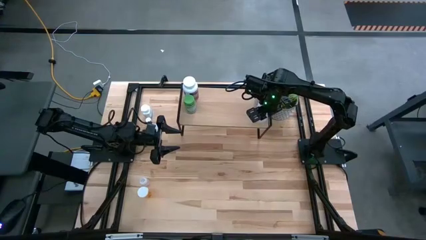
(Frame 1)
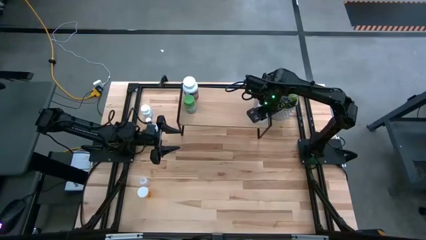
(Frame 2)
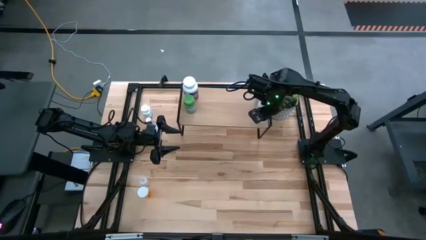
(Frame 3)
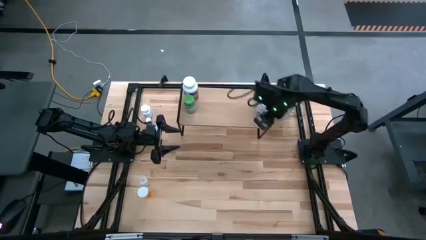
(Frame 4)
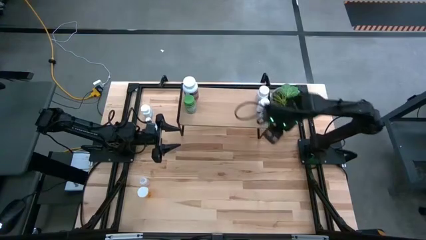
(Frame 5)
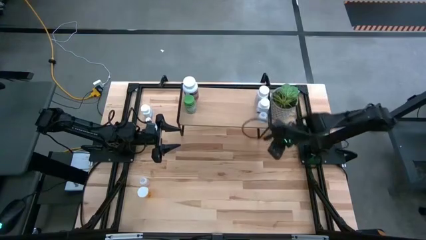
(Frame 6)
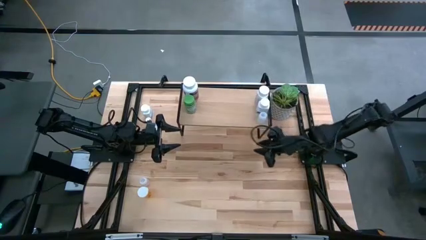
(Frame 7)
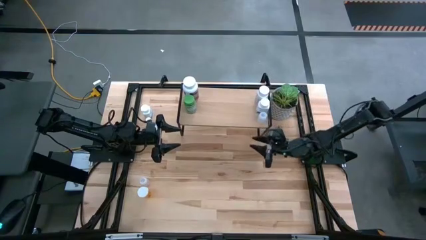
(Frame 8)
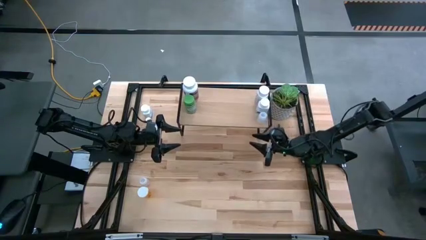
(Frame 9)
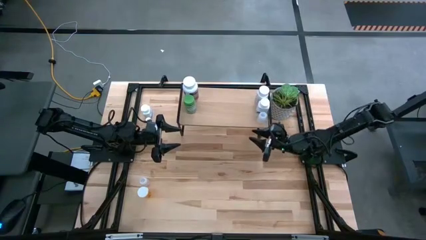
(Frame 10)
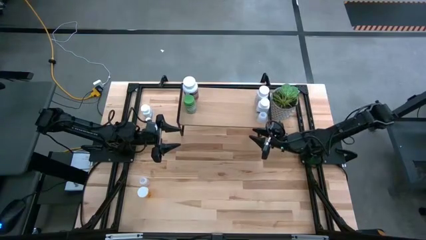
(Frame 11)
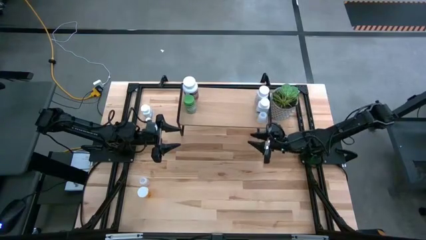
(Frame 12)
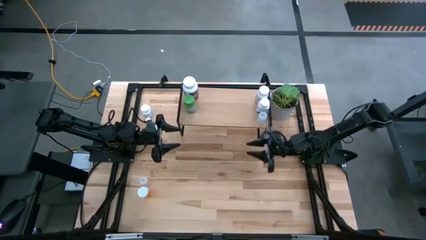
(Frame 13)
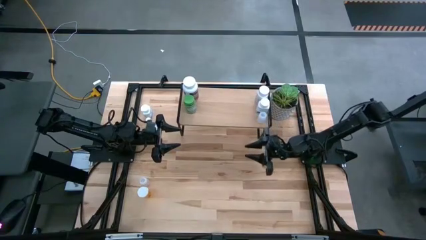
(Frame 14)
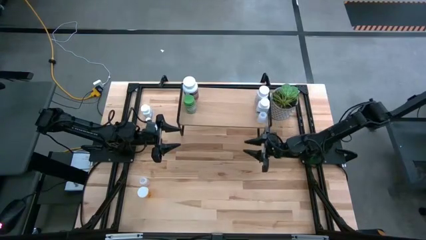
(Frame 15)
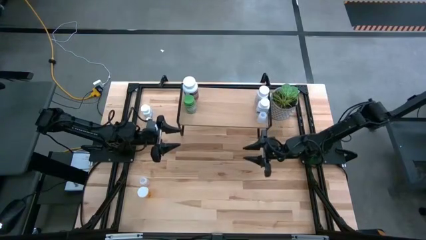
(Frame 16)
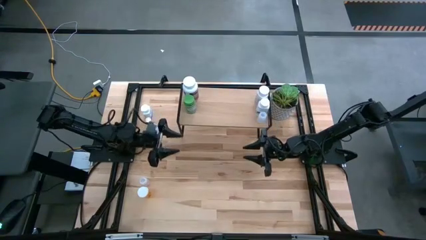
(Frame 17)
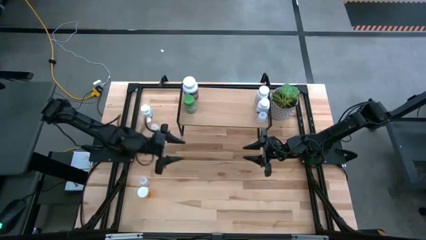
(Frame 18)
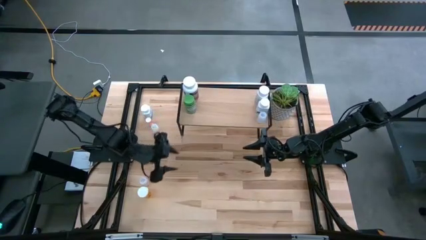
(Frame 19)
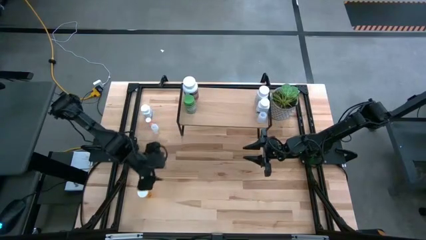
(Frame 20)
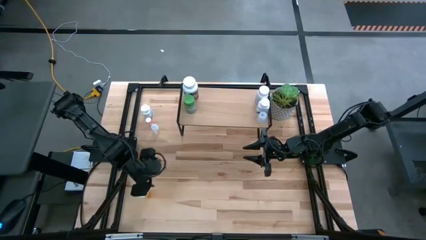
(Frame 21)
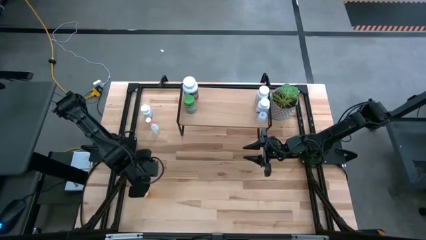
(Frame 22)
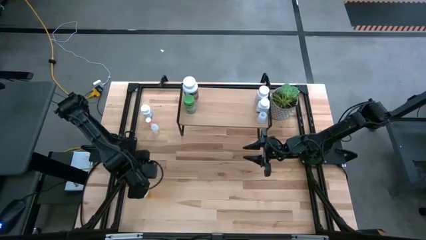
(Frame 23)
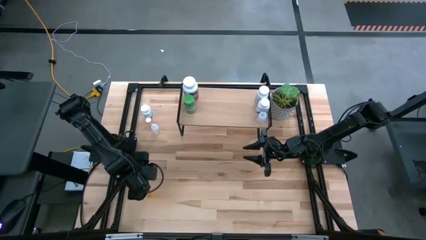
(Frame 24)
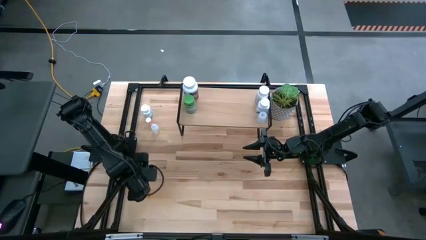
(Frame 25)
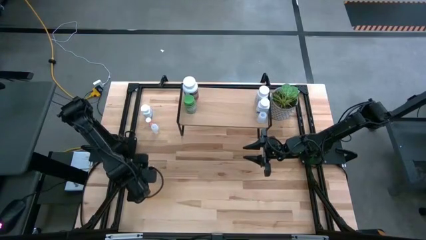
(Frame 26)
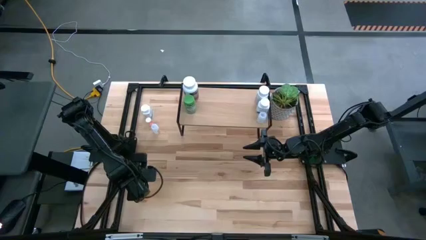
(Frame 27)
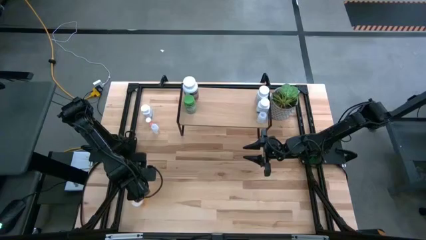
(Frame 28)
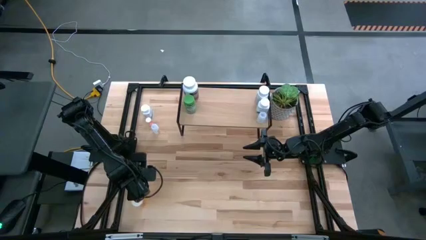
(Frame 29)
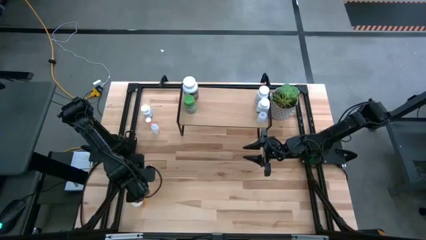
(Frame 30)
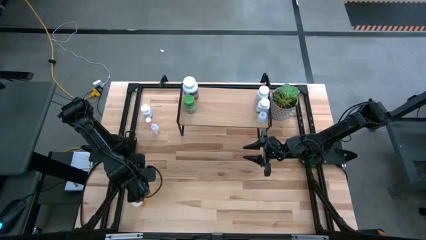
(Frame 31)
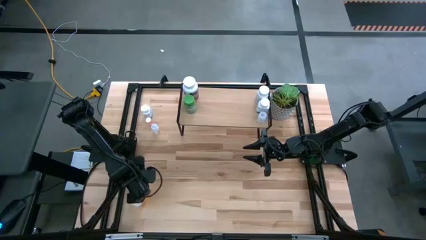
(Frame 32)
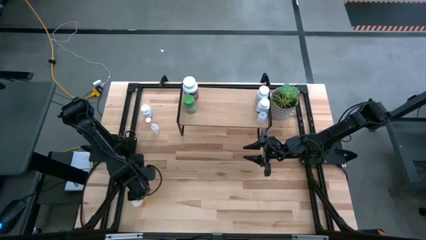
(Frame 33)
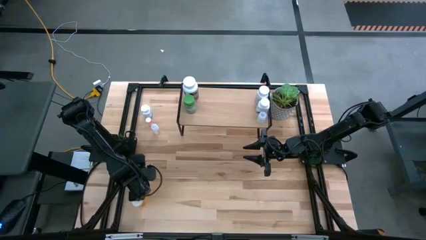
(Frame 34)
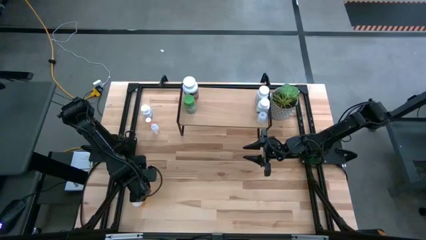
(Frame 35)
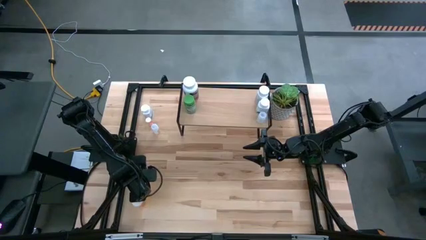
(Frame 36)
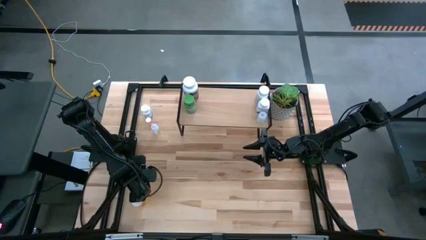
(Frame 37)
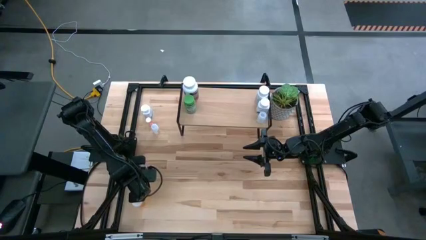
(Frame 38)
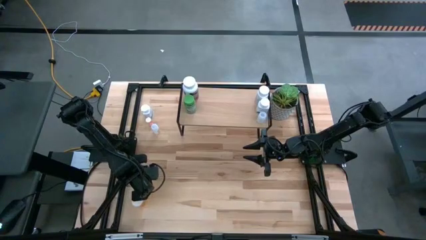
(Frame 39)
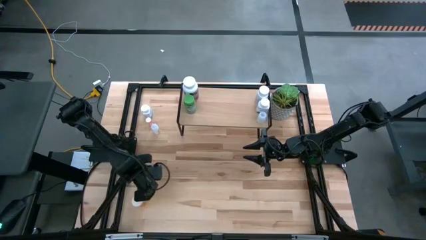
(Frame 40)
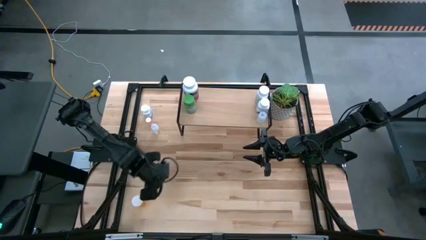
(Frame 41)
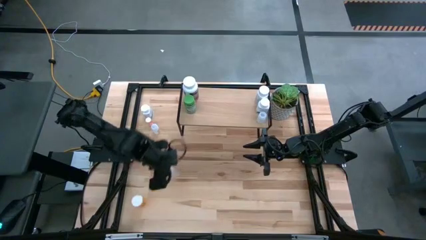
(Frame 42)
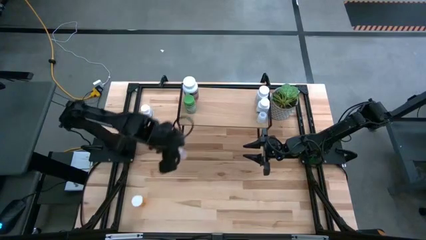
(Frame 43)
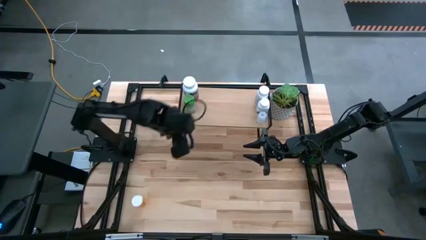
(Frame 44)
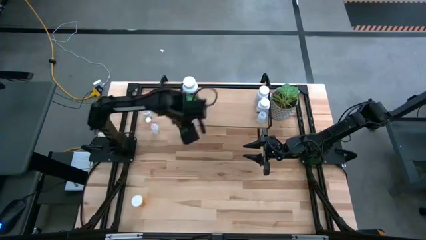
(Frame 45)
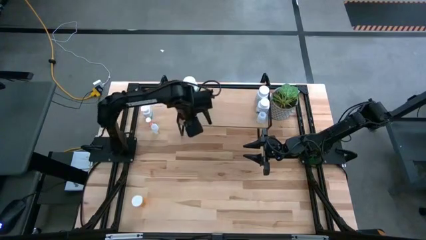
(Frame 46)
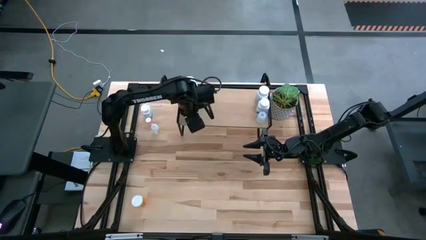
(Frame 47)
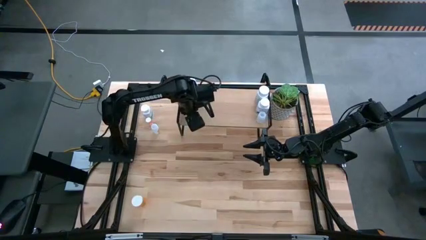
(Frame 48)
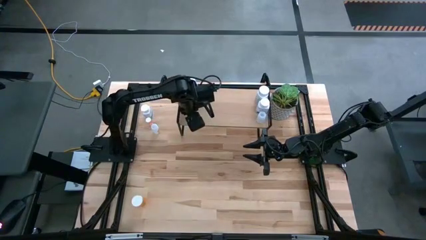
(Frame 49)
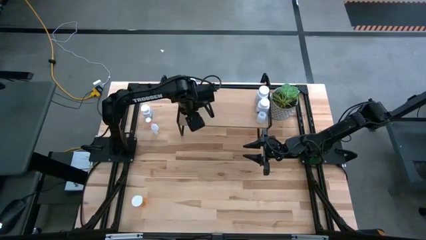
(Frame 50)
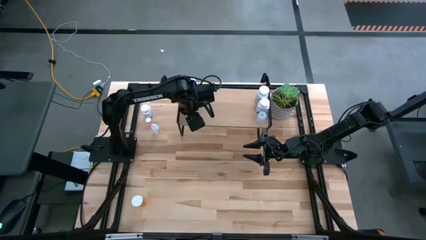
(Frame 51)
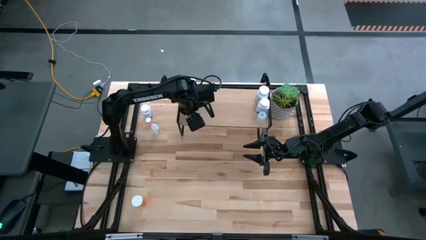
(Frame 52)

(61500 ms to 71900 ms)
Task: Pick and place medicine bottles onto shelf by color
Put the transparent pill bottle on the shelf

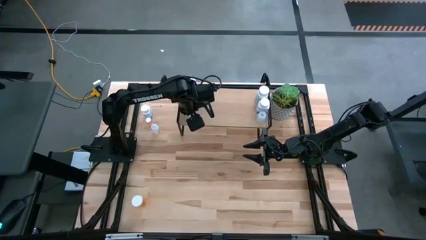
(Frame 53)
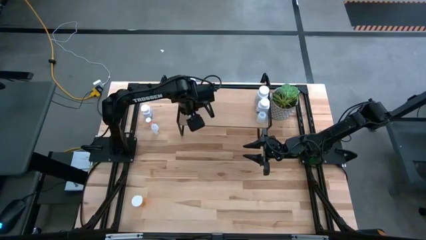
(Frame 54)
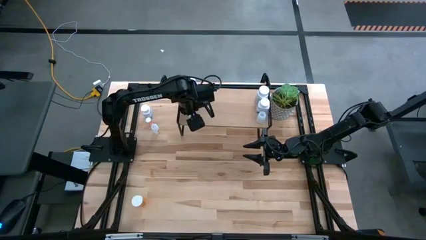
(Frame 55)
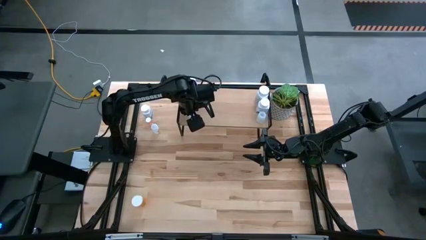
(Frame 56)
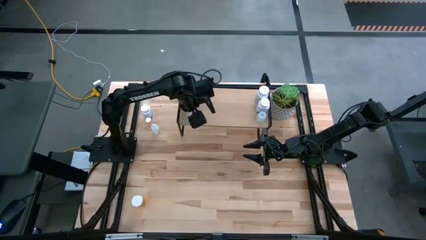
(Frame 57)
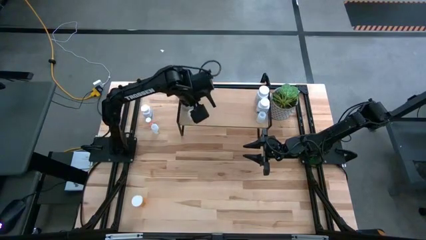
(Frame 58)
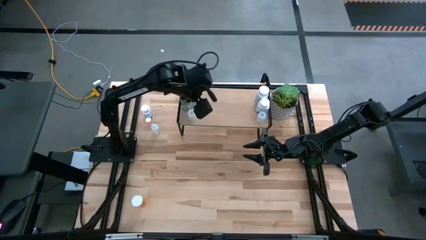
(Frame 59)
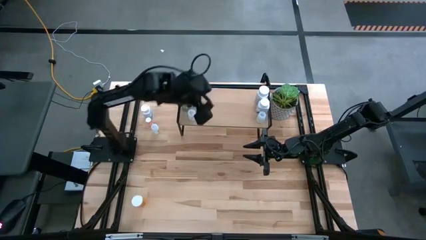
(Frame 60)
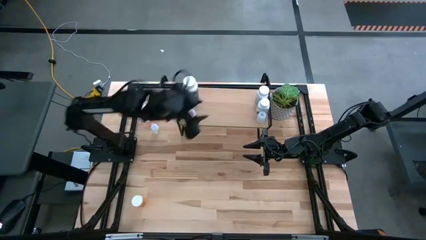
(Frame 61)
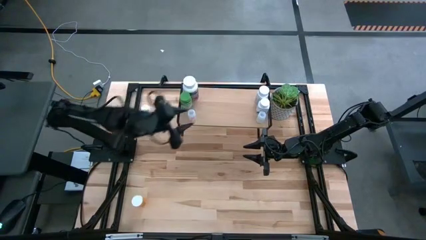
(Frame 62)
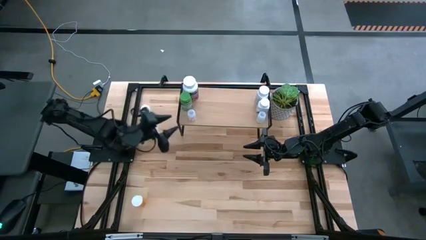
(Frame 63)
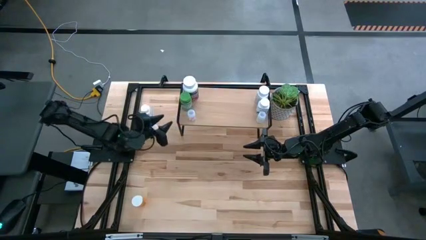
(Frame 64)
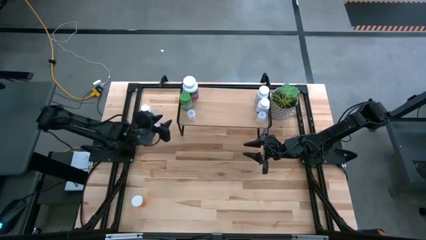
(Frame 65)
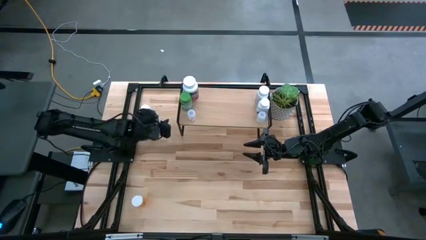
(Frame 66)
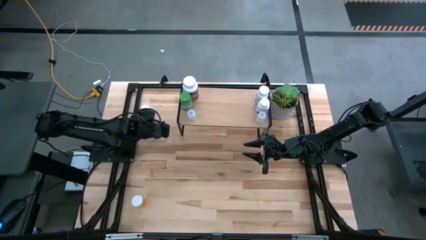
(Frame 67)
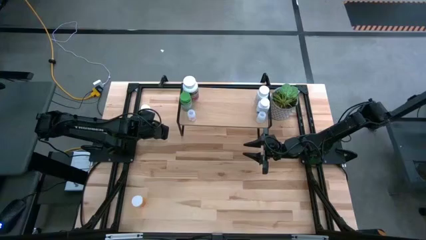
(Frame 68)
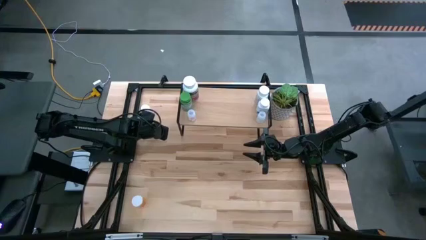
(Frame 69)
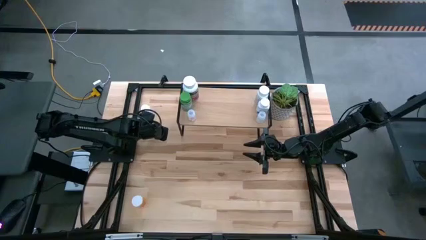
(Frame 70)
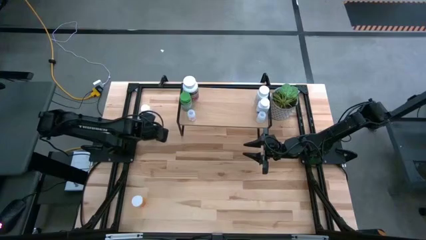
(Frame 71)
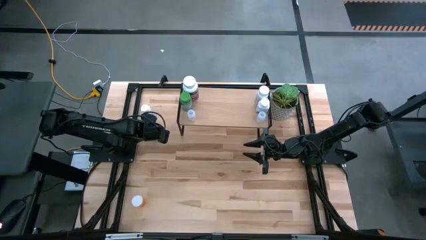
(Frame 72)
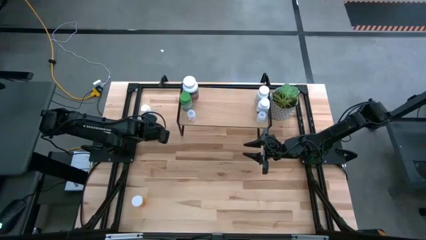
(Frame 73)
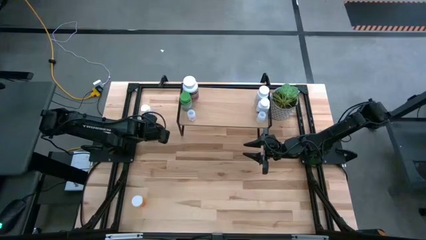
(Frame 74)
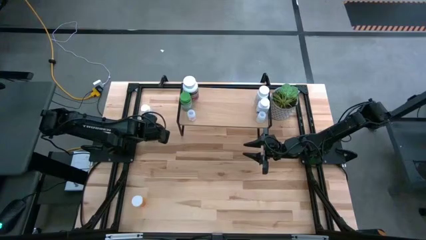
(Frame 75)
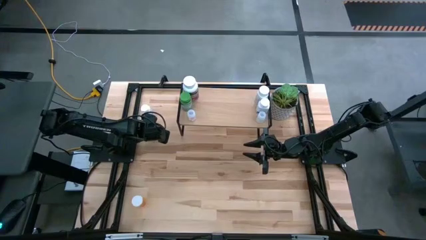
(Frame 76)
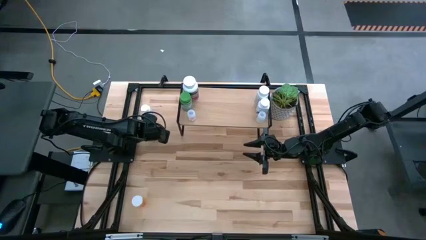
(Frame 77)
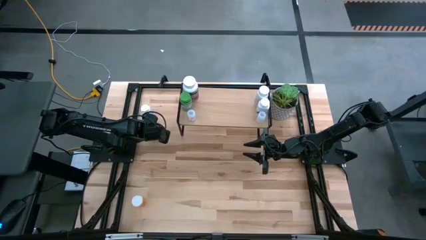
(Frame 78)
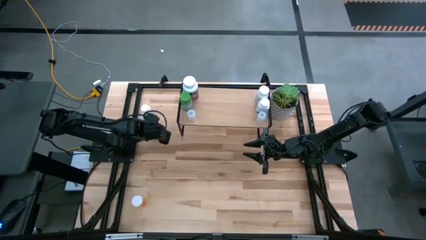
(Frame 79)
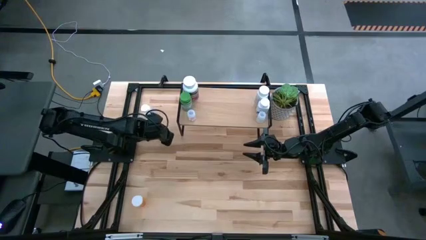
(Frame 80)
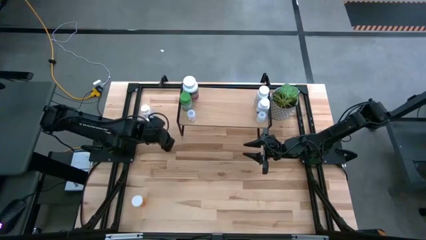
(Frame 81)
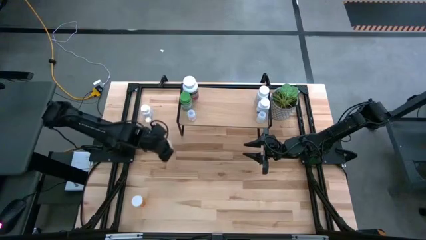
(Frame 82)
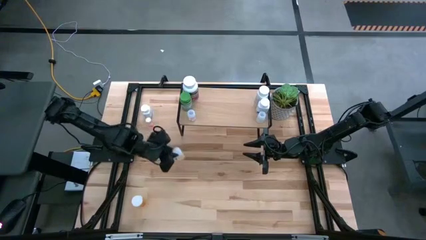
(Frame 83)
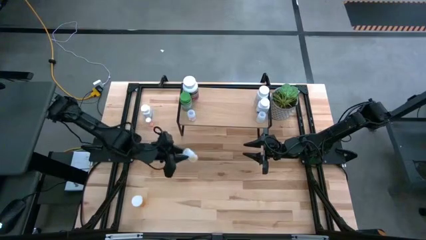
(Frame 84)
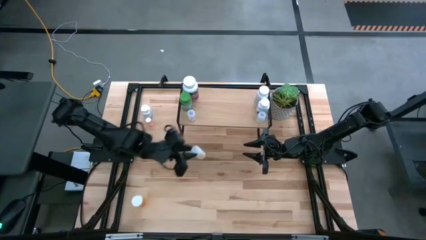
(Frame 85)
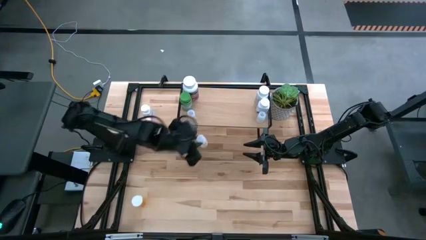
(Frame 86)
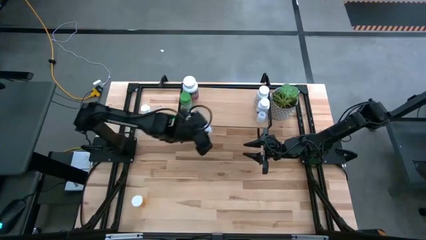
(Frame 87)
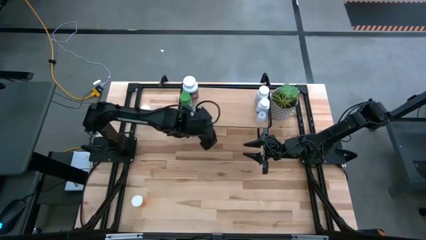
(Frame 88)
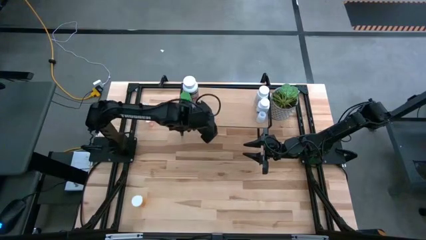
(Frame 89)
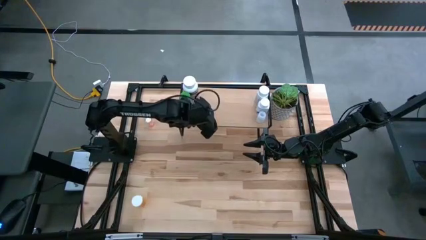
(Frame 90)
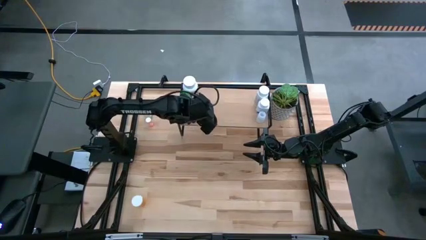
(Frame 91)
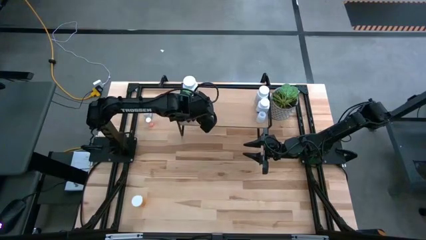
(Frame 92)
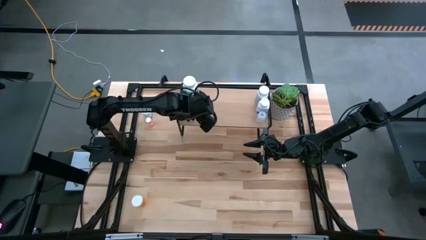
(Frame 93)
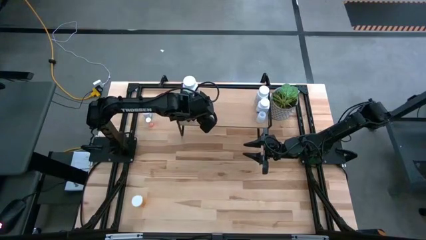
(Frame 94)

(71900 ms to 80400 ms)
Put the transparent pill bottle on the shelf
